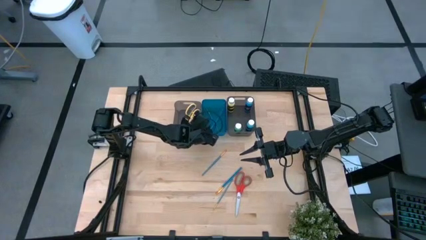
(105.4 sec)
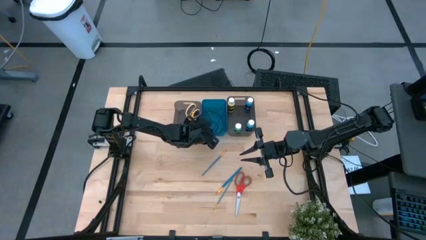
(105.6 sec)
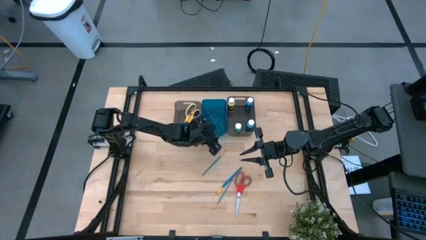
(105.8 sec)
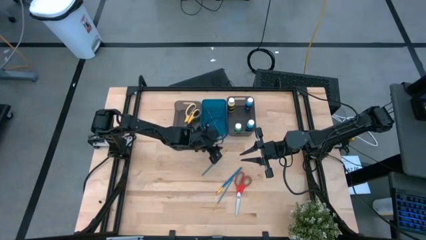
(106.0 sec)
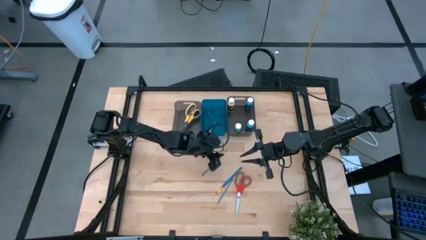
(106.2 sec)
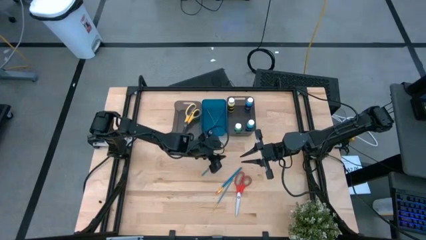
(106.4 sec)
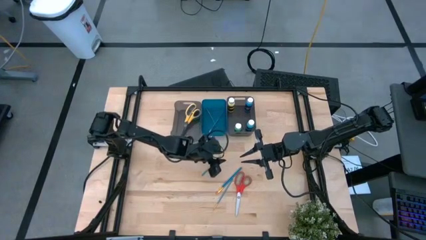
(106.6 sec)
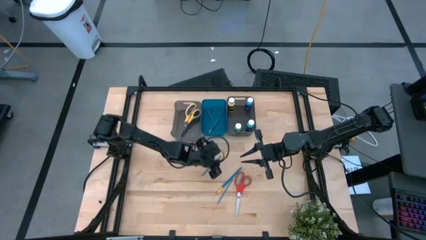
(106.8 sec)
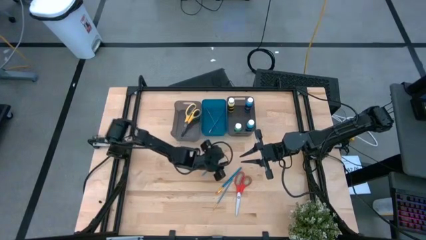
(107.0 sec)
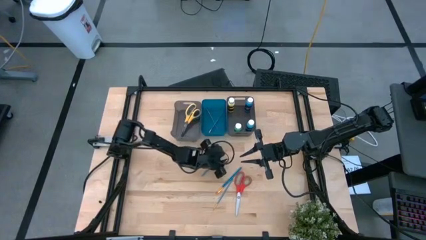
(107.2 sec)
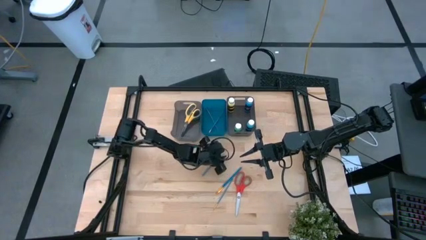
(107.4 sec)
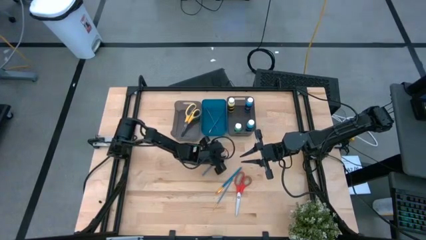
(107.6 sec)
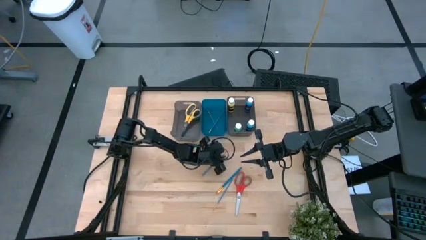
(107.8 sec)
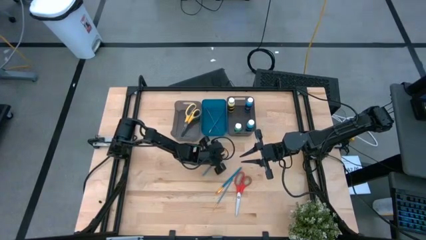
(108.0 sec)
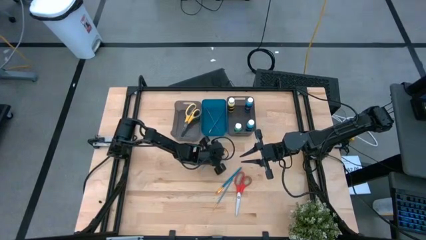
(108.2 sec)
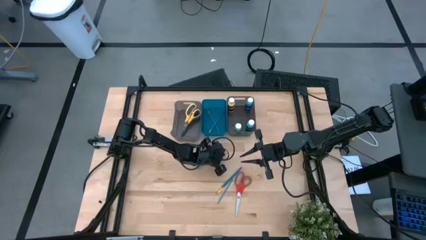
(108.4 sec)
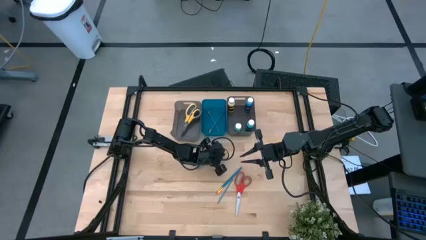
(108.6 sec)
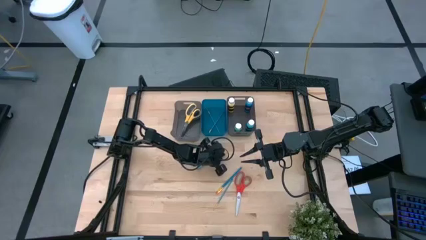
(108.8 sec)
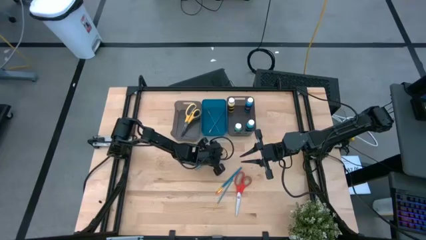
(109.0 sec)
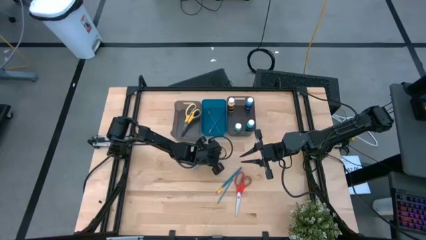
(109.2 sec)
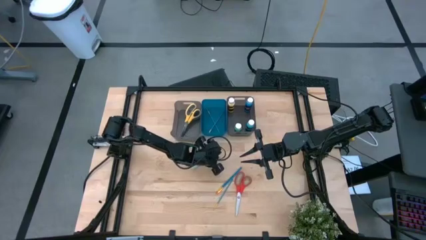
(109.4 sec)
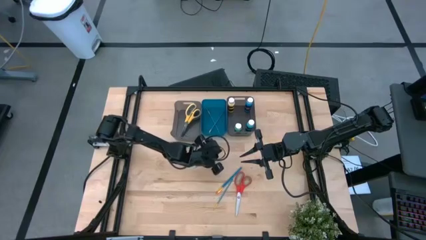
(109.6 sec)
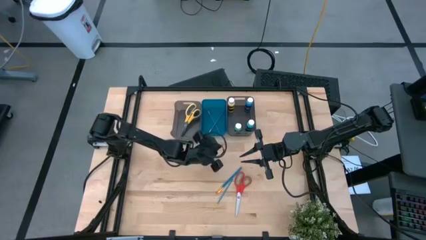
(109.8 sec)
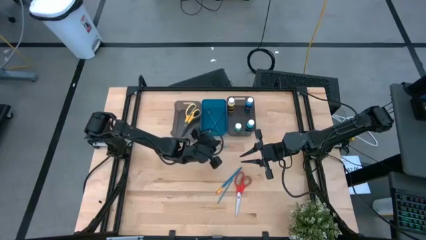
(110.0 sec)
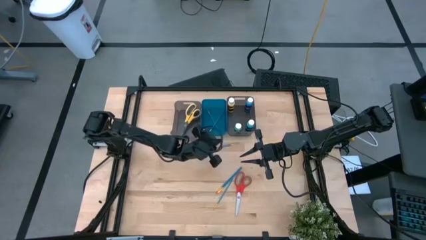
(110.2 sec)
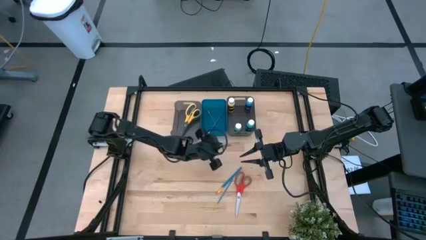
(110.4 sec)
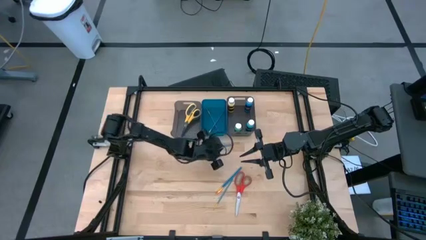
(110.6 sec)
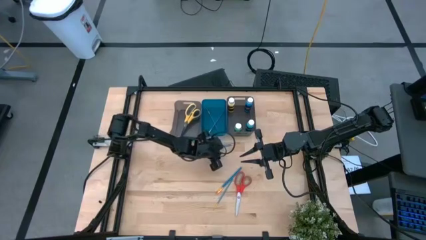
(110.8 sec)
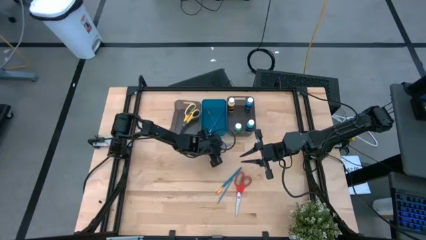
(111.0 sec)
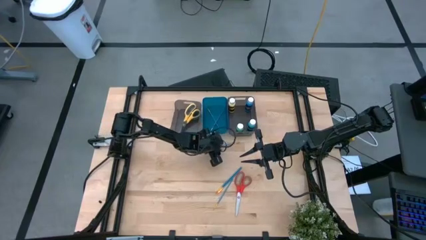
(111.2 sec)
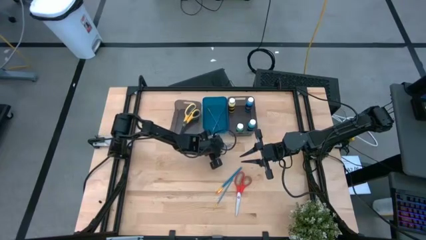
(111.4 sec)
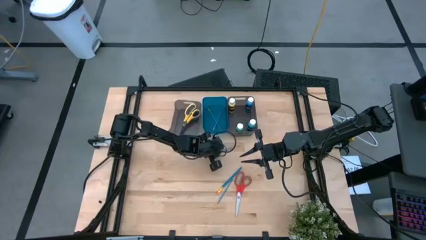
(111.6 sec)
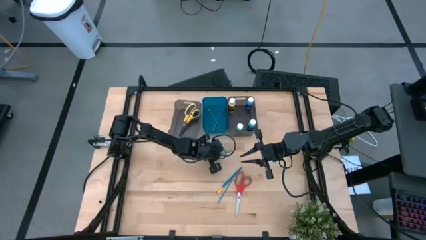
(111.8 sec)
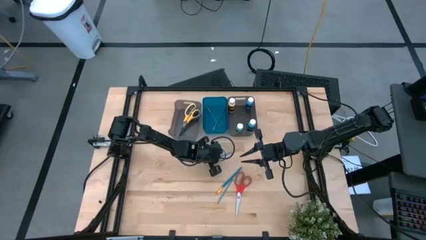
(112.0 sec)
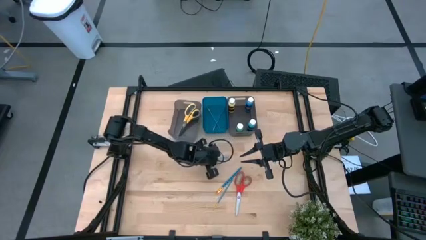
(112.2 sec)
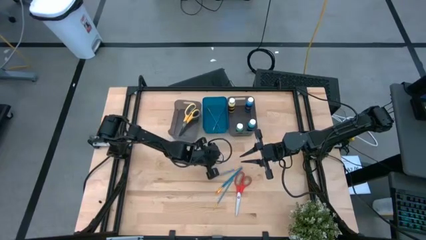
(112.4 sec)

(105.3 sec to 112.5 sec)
Task: Pick & Place Paint Supplies
Put the blue paint brush into the blue bin

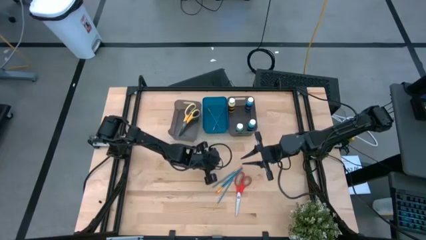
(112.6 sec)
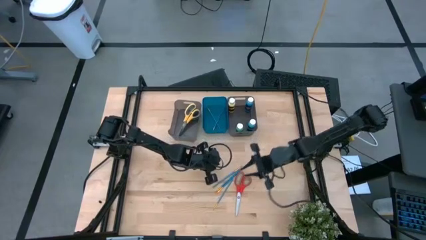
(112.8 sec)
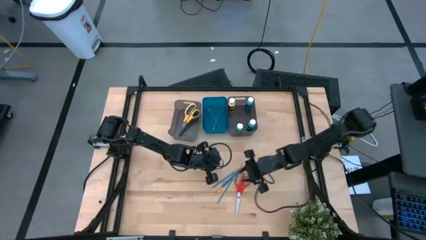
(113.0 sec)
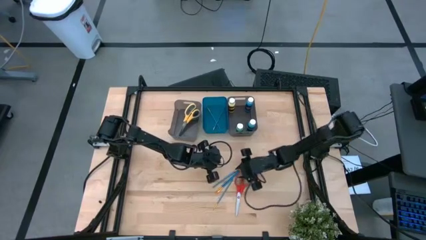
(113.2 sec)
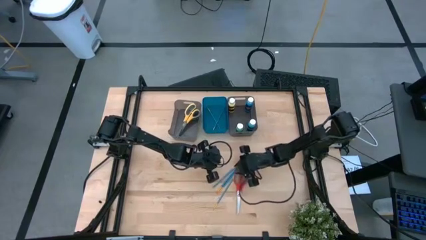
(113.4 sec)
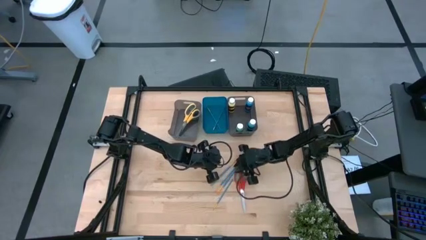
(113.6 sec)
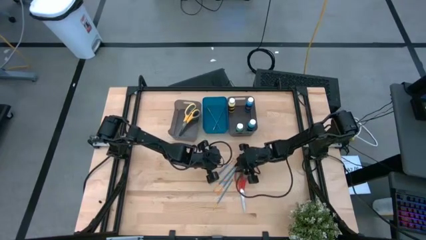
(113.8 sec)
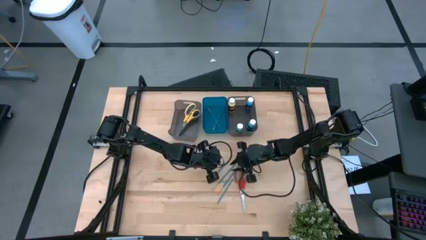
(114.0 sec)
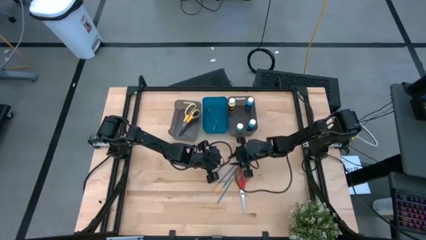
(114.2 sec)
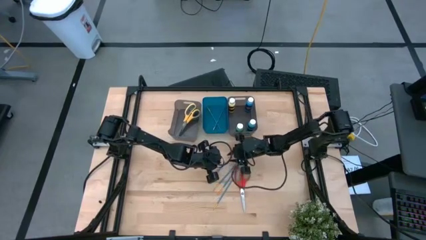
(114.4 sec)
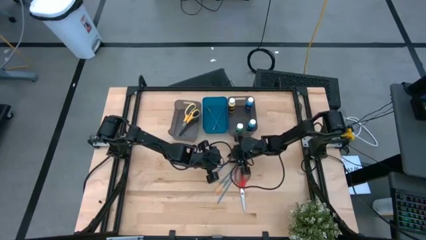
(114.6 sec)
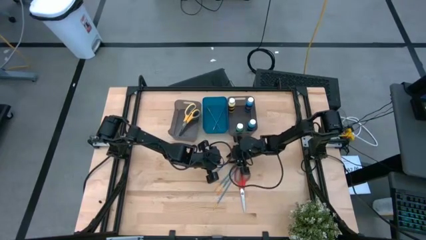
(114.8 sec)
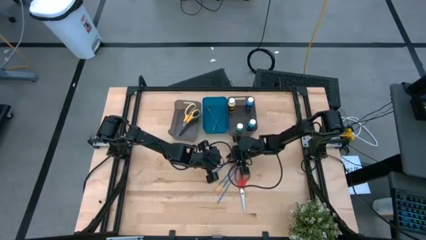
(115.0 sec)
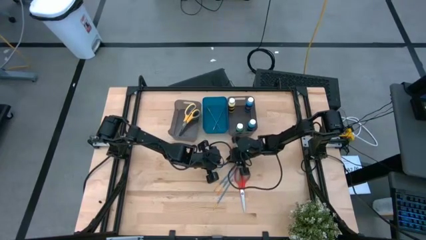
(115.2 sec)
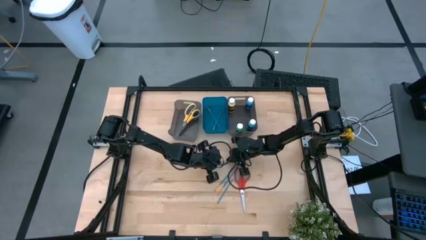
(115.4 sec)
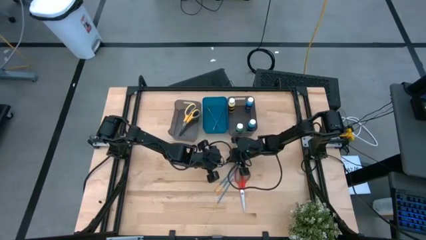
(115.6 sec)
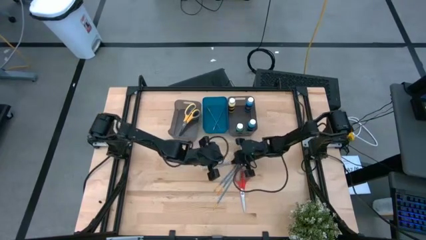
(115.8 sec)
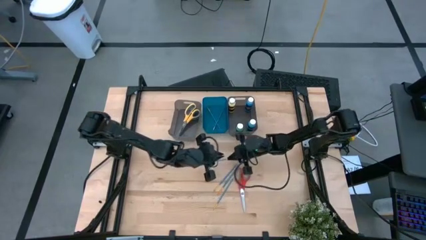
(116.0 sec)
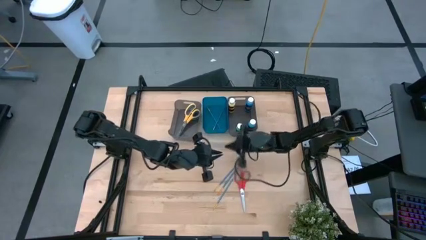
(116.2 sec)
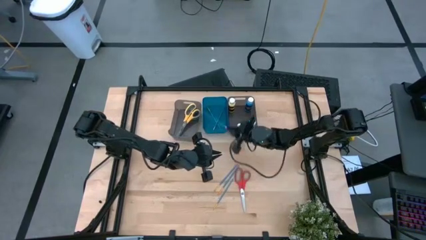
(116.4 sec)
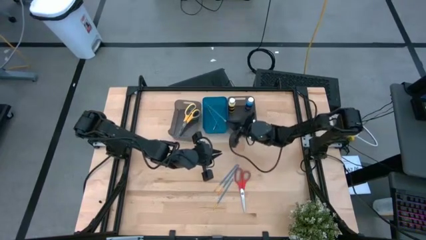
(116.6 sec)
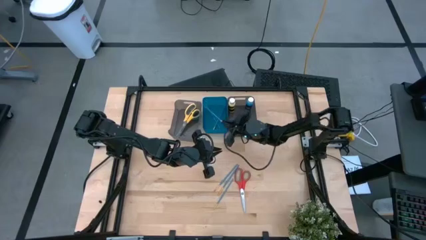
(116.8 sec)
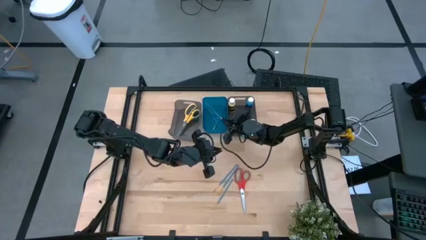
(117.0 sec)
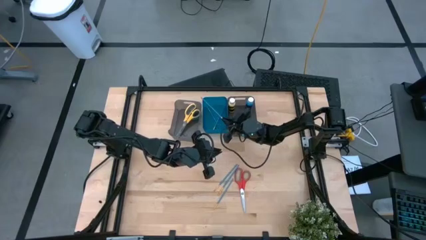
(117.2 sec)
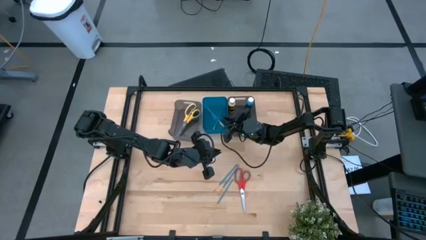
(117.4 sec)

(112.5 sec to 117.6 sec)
Put the blue paint brush into the blue bin

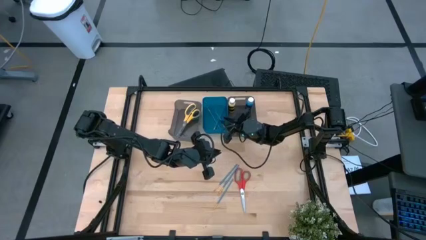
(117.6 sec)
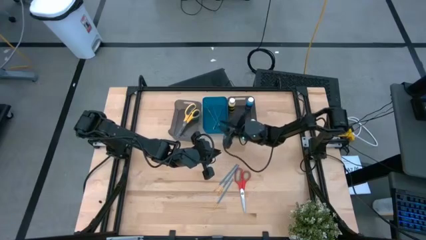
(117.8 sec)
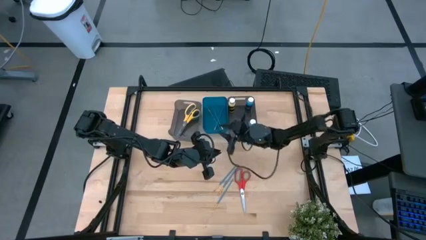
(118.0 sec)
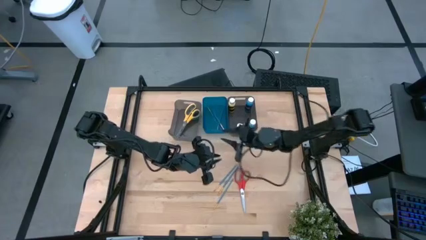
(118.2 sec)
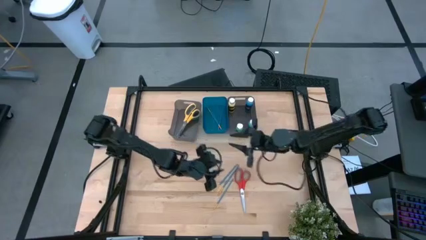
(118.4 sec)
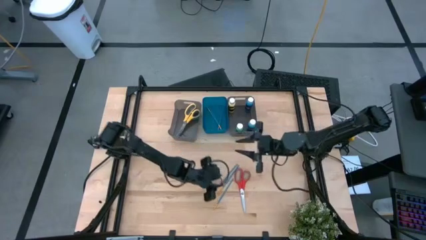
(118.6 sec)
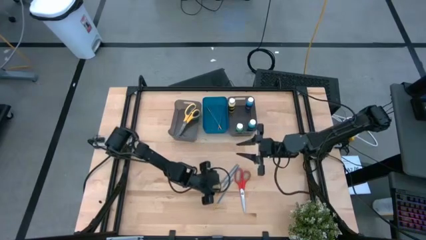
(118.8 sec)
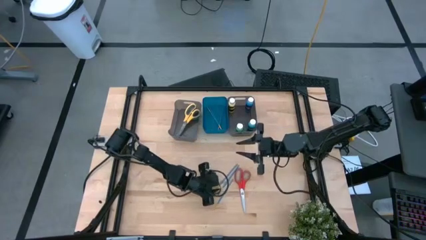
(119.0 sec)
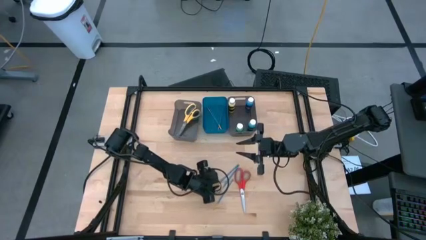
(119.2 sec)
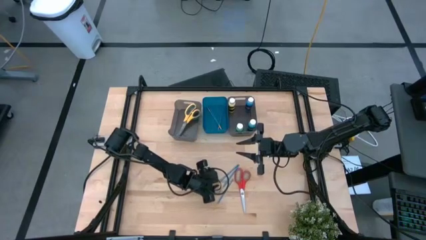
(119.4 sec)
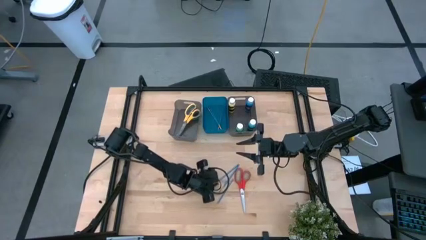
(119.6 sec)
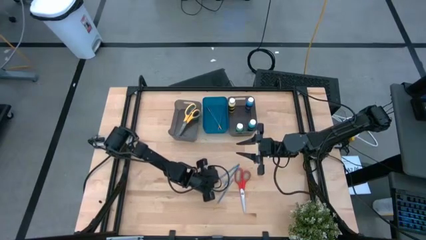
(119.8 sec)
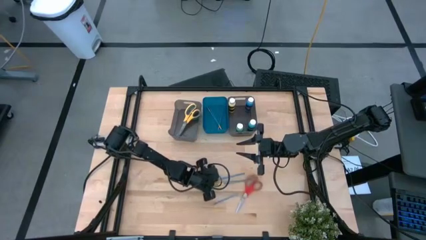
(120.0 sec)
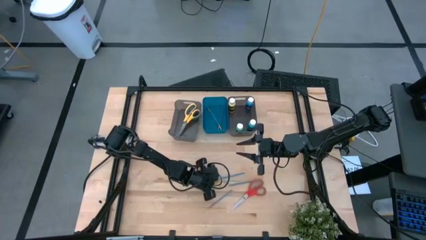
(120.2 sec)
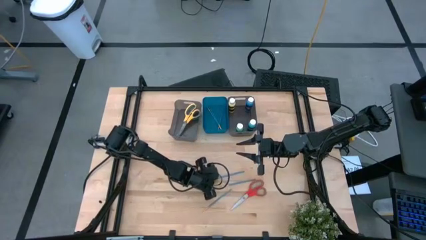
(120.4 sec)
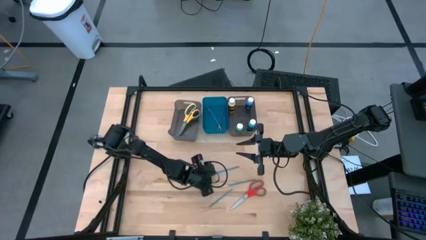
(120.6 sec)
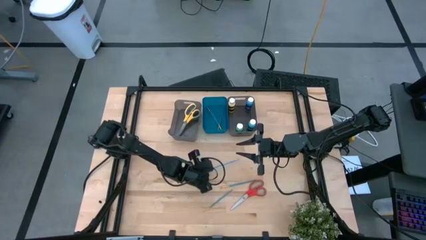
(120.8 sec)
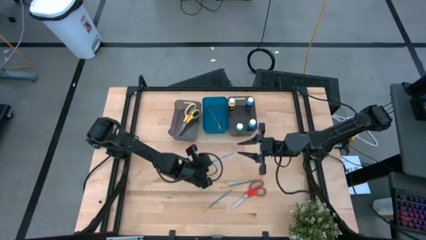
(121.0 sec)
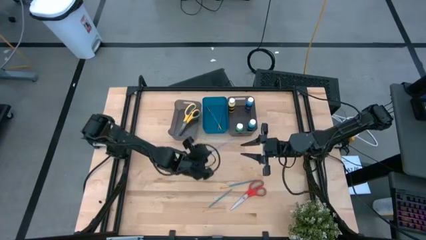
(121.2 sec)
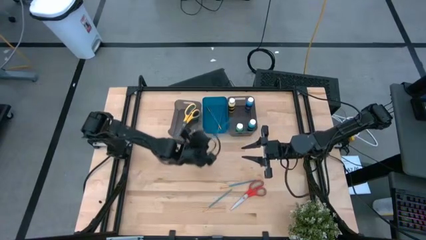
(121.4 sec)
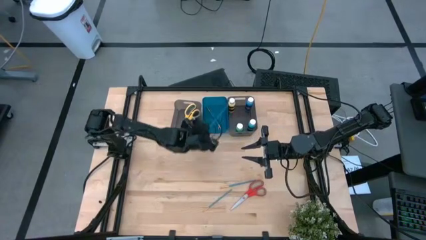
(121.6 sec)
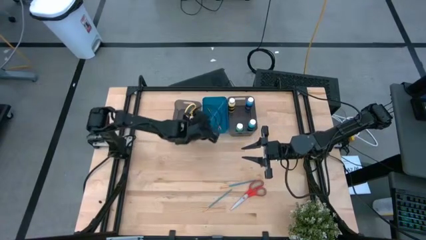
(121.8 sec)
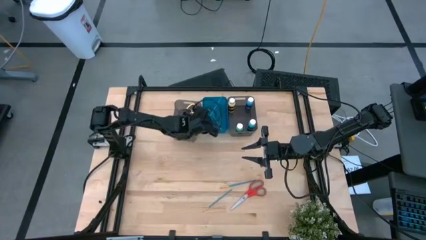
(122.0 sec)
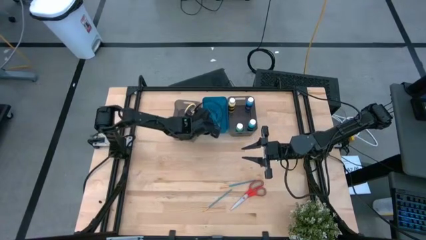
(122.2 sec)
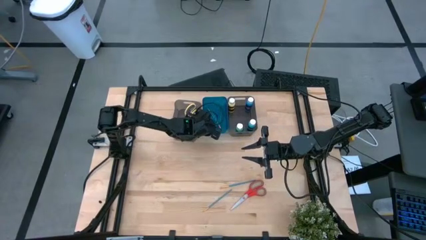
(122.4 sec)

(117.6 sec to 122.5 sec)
Put the blue paint brush into the blue bin

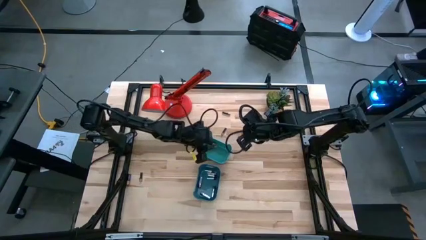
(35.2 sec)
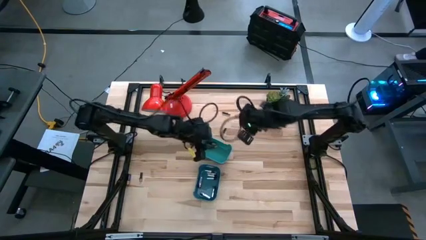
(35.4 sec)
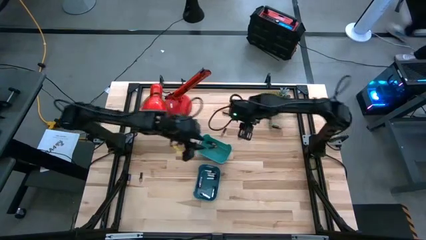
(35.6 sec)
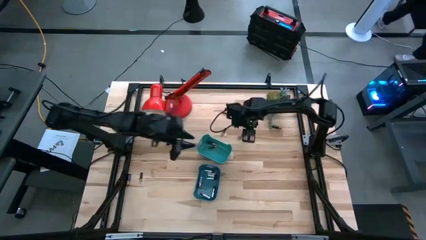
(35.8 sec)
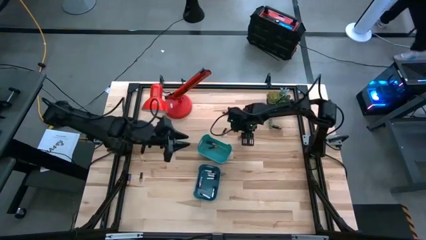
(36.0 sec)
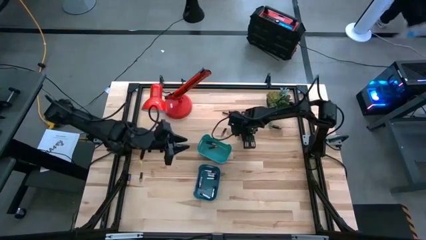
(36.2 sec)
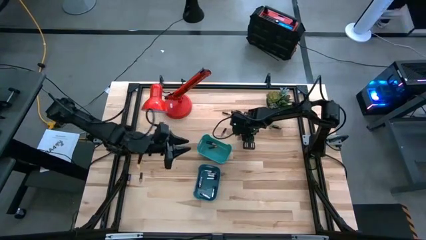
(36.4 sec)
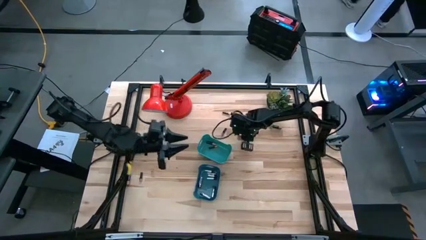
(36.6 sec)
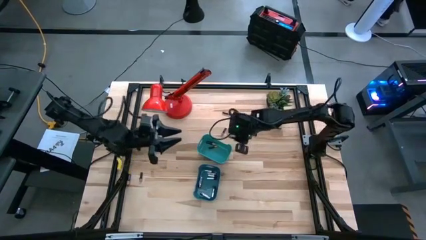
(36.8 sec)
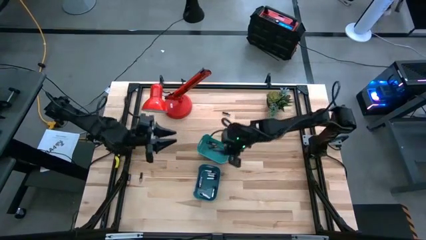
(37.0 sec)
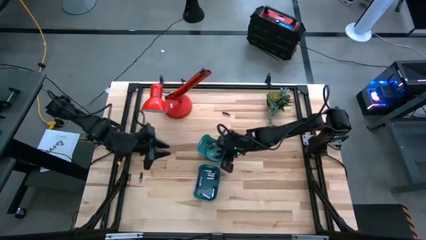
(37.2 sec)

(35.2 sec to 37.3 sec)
Task: Sort batteries
Put the black battery into the light blue bin
